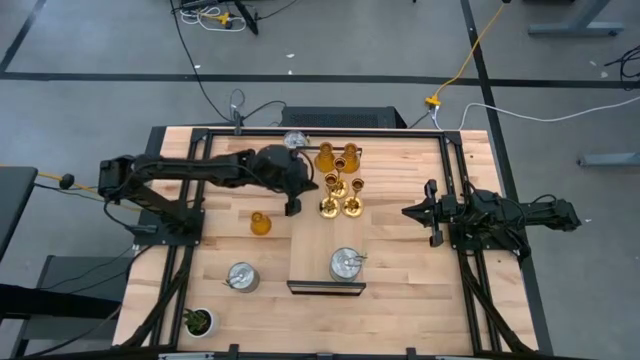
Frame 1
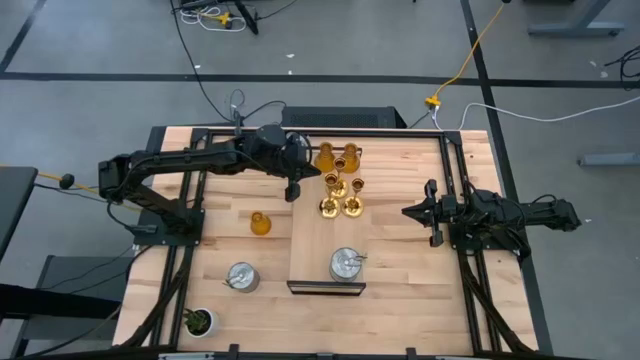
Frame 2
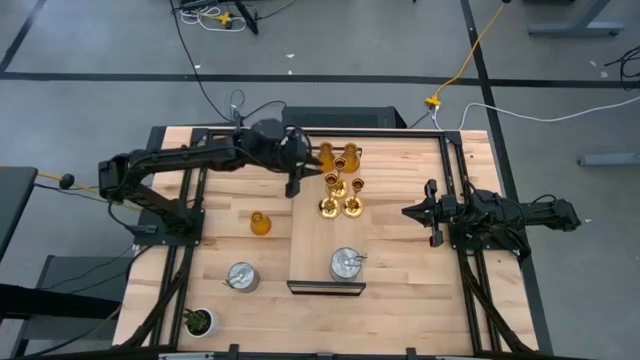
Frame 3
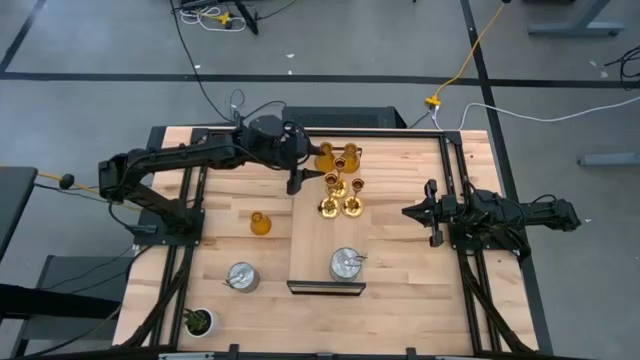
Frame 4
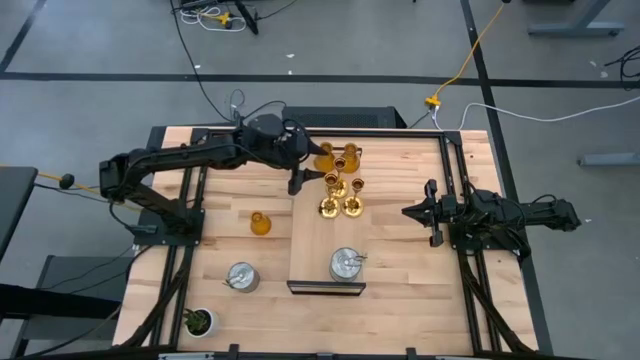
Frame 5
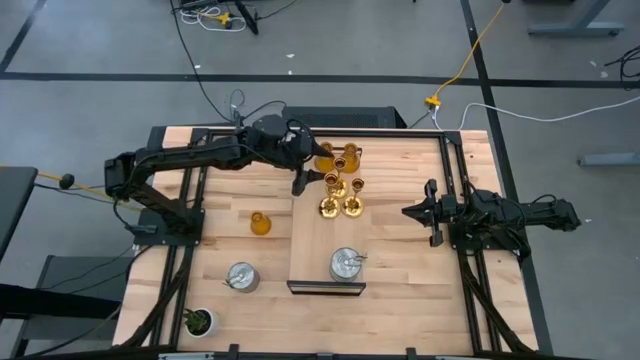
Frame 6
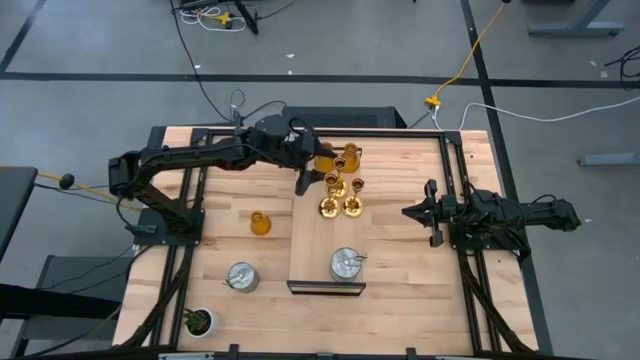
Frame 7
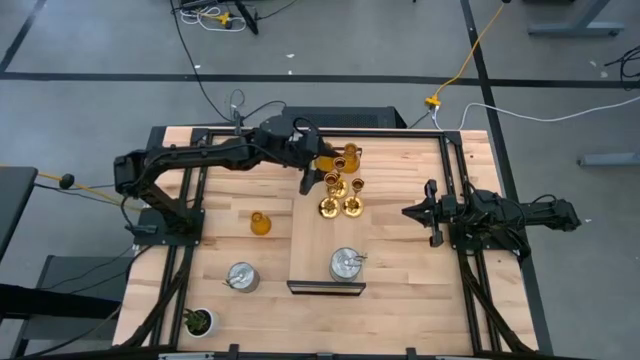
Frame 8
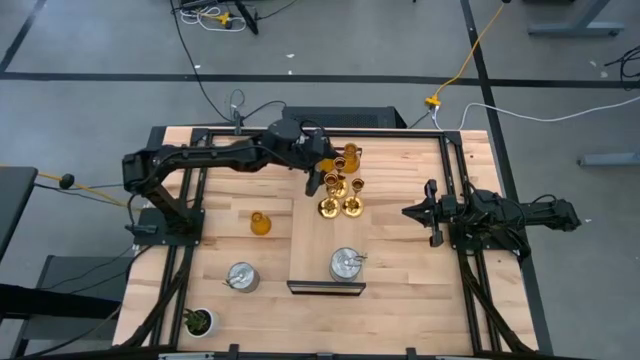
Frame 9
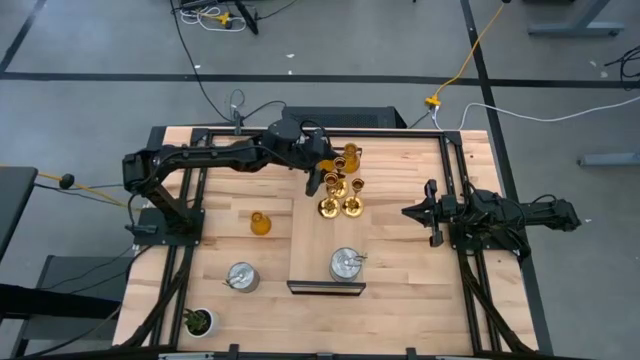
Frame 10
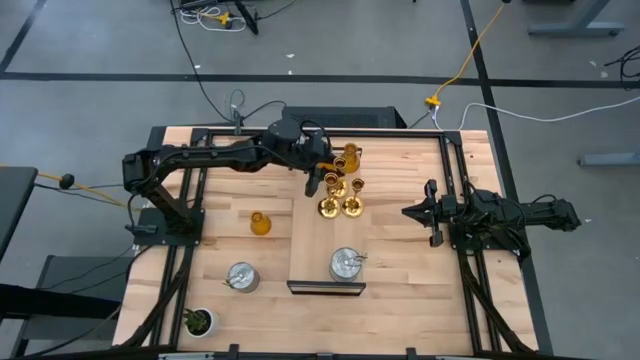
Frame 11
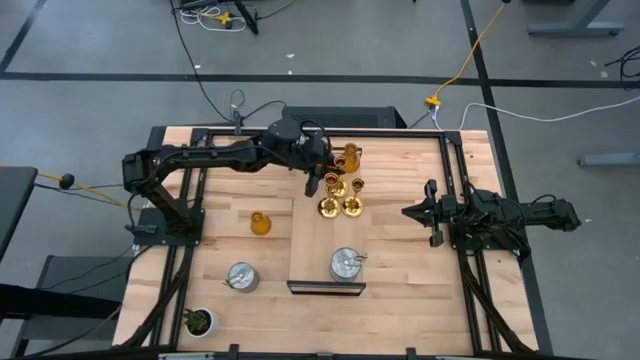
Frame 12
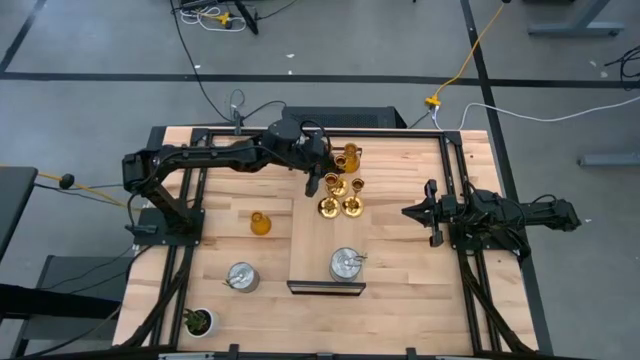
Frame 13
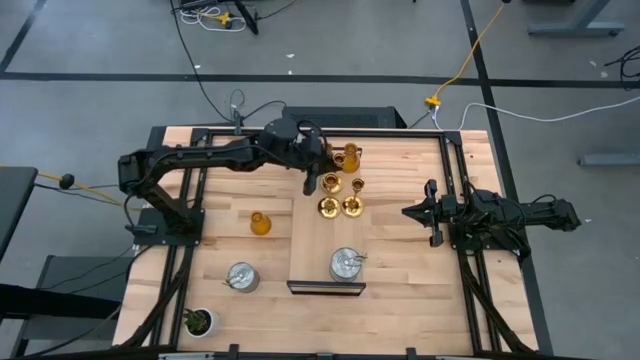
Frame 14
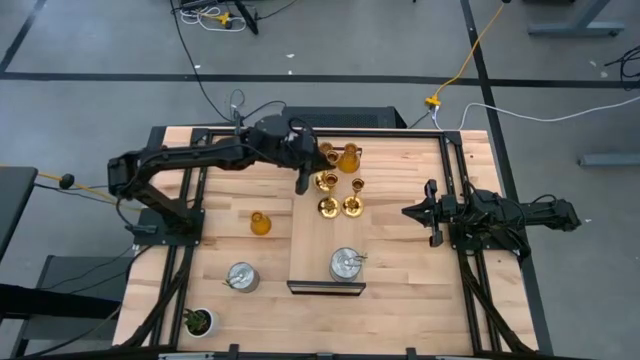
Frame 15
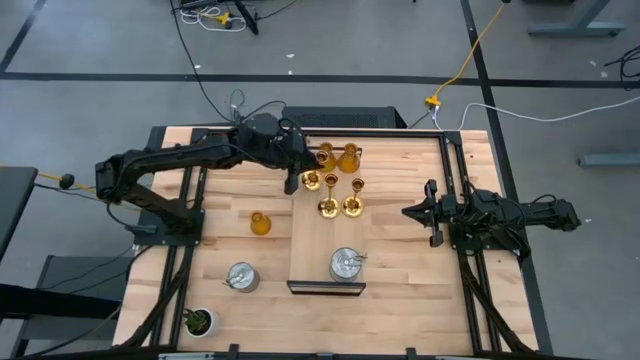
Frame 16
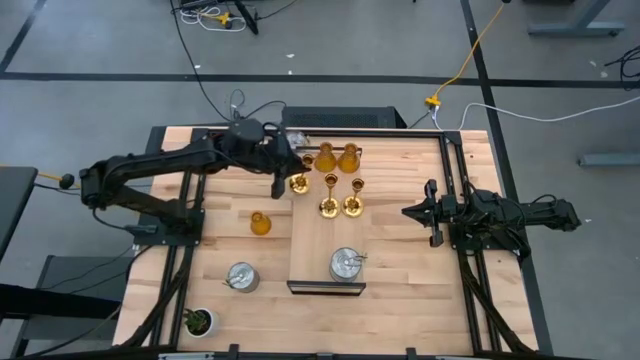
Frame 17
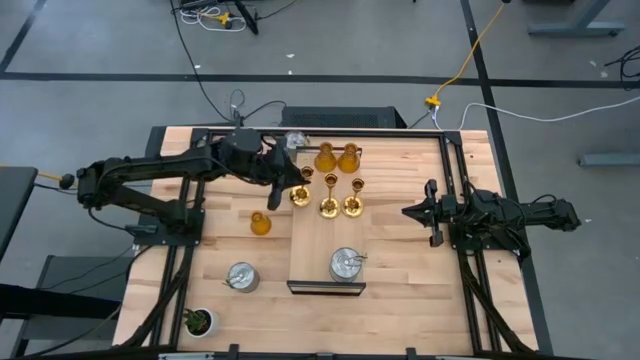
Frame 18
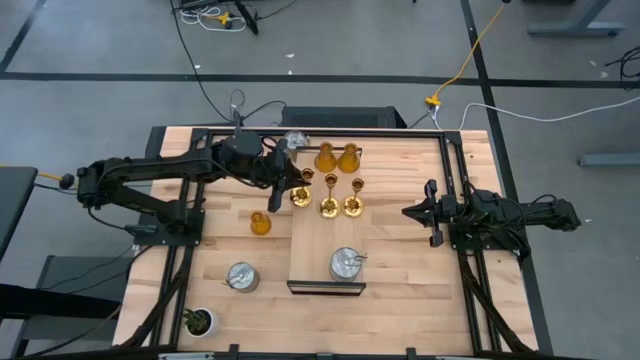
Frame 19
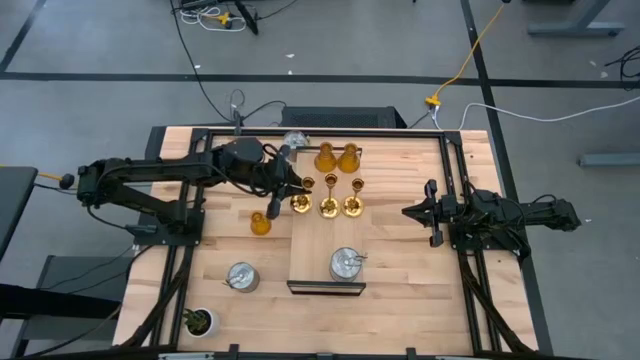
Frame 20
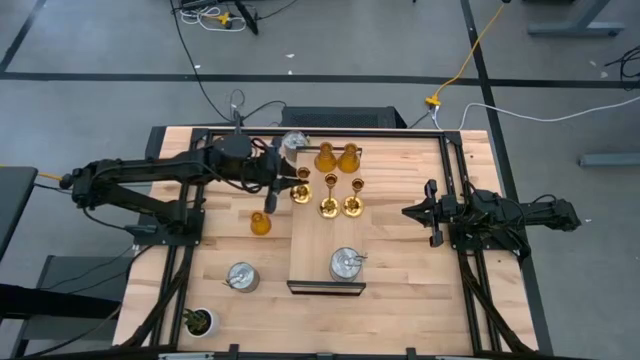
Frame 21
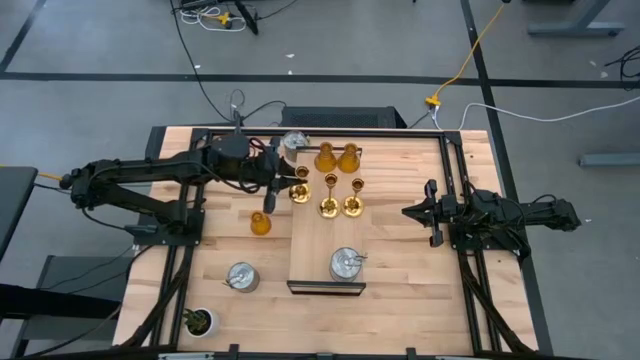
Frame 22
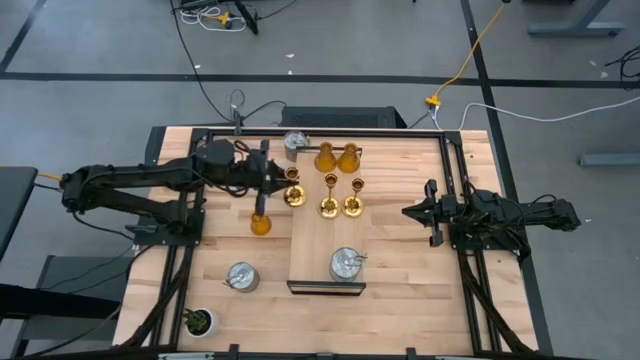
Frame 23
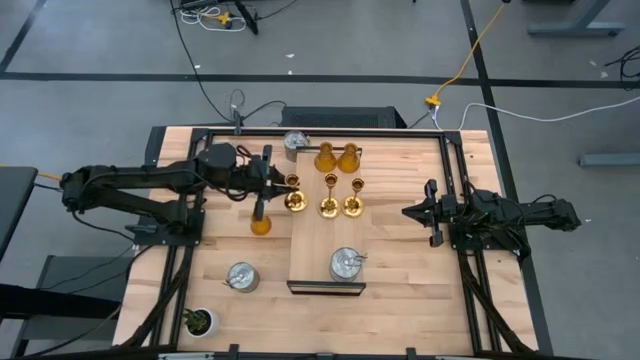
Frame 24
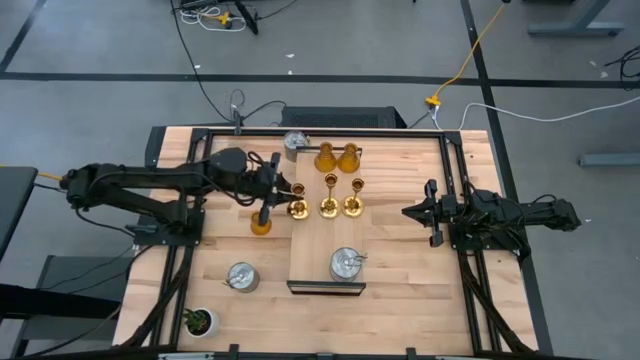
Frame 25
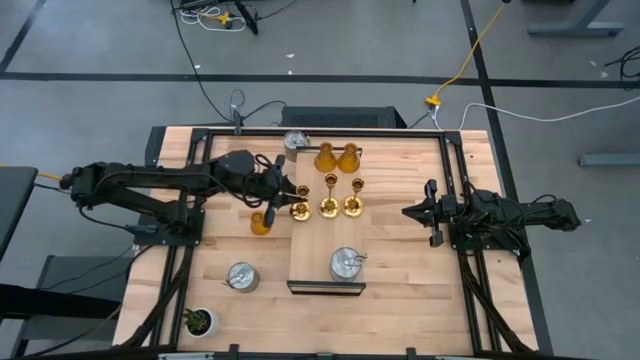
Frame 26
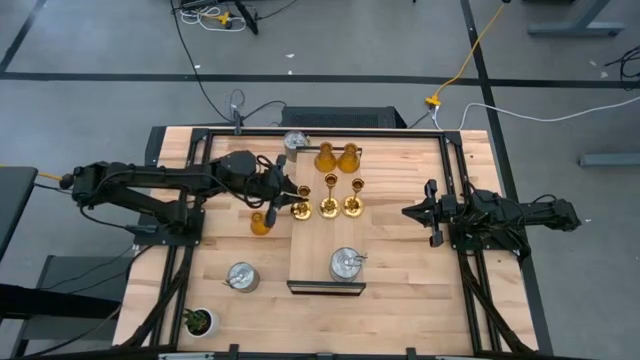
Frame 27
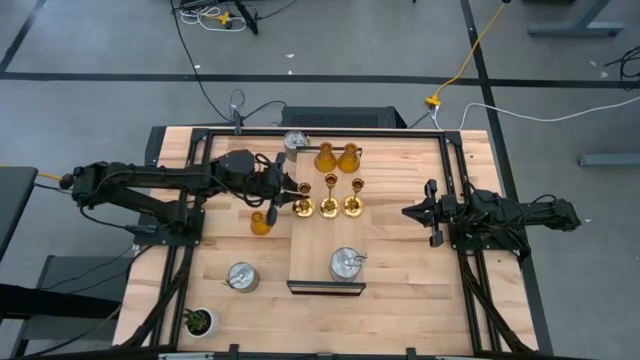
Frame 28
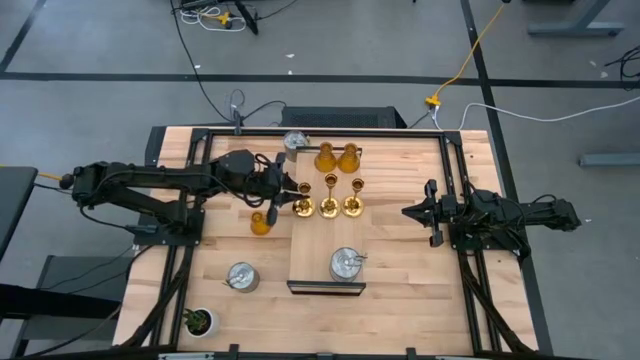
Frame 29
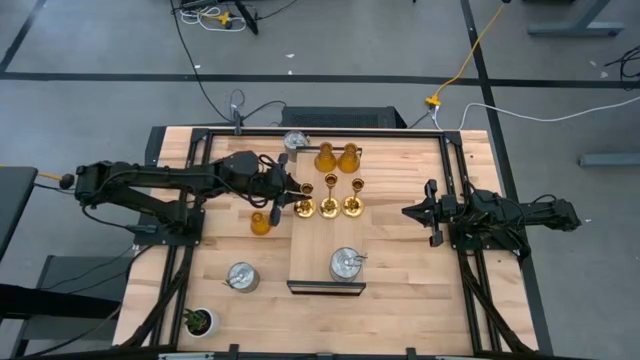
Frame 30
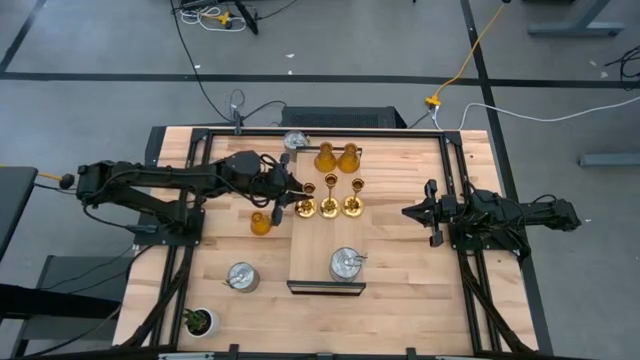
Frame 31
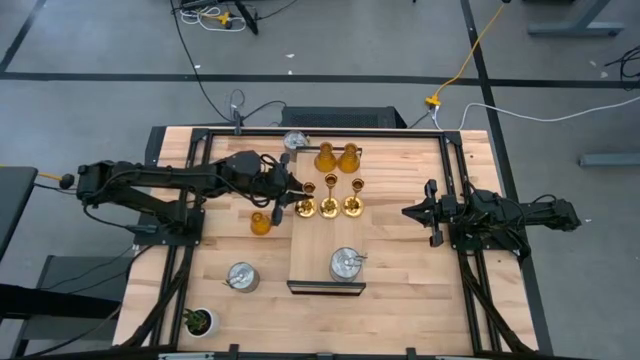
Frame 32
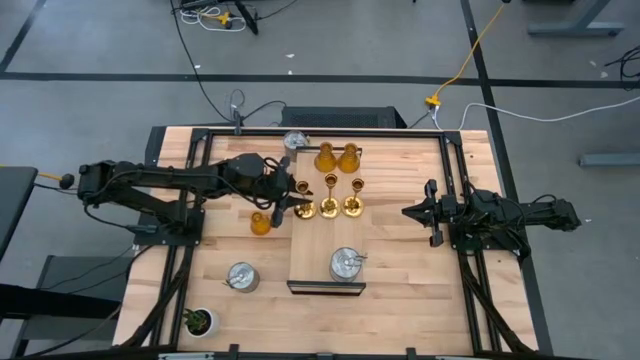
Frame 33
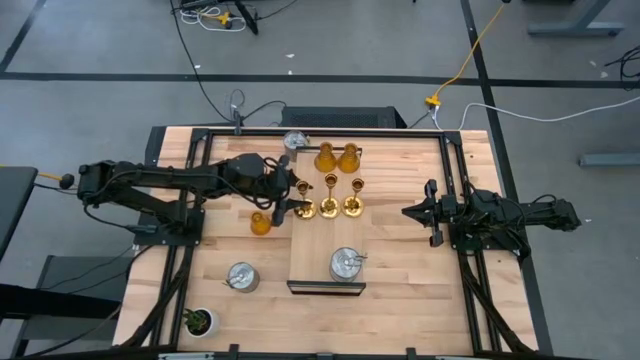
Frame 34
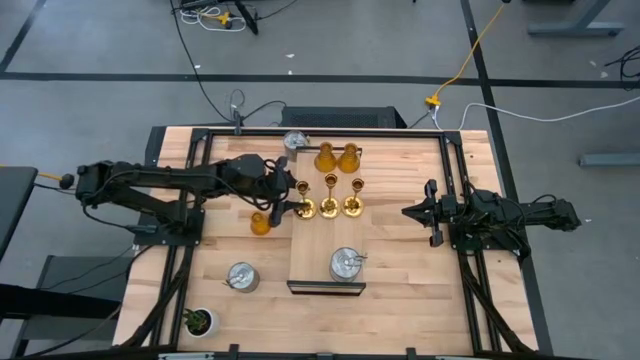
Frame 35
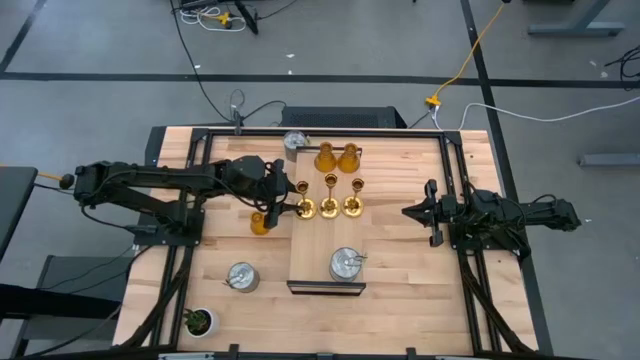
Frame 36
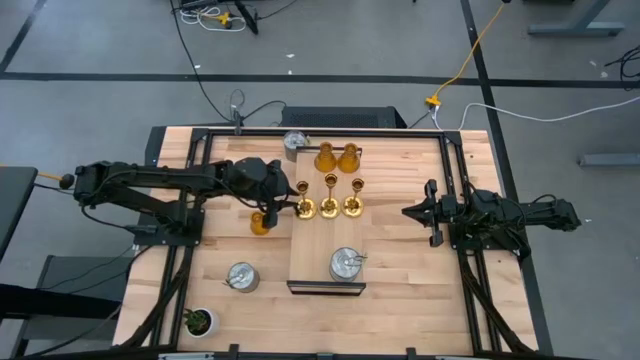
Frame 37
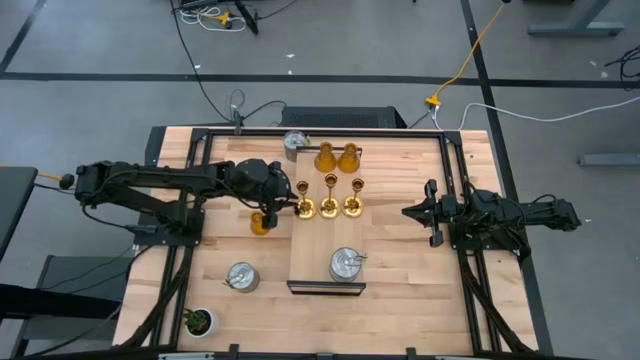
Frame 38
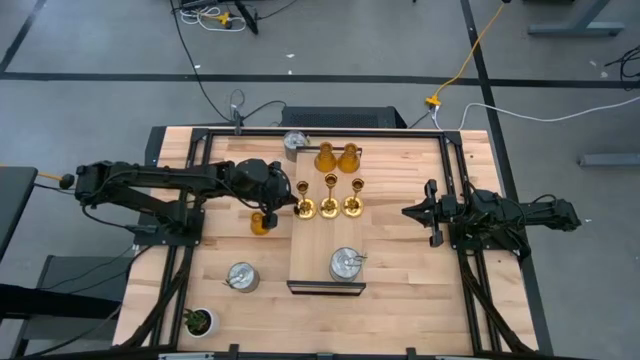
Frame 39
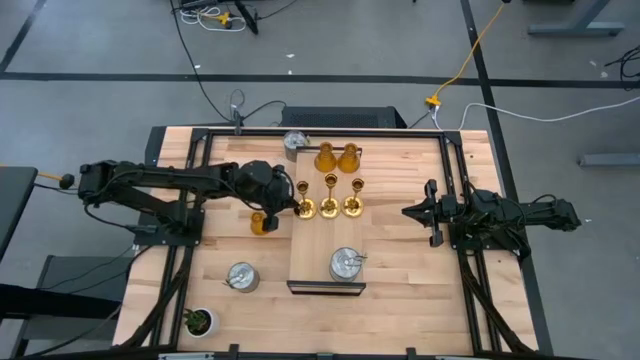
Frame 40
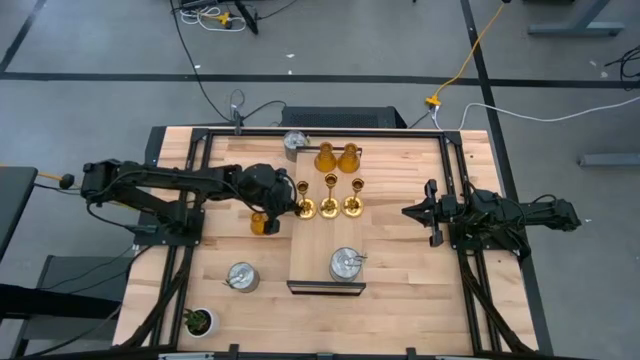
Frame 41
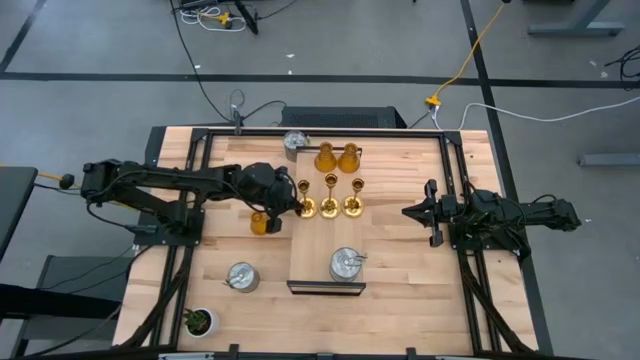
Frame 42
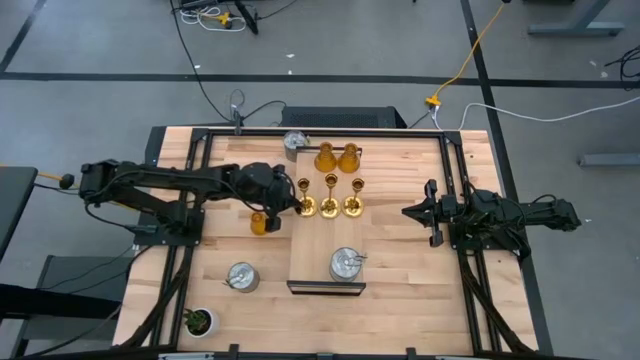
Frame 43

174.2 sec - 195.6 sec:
Task: Pick & Place candle stick holders
Move the candle holder to the middle of the shelf aligned with the other candle holder
